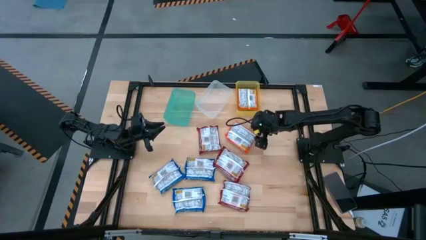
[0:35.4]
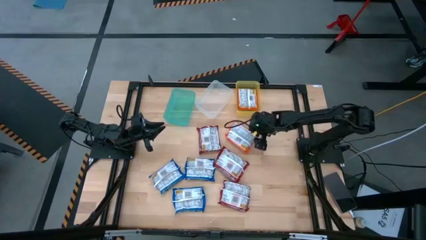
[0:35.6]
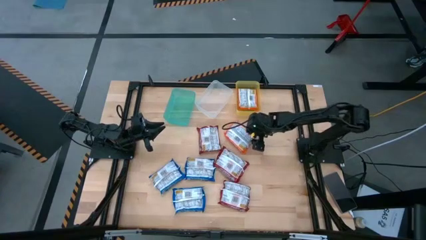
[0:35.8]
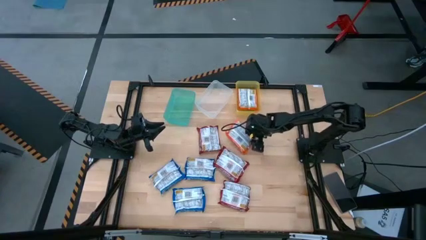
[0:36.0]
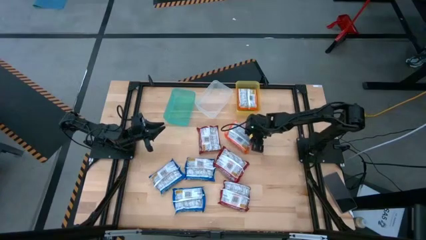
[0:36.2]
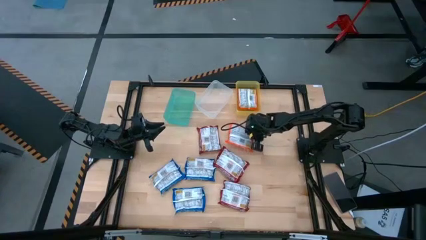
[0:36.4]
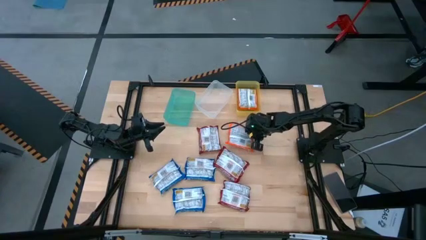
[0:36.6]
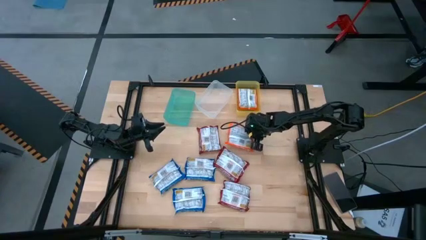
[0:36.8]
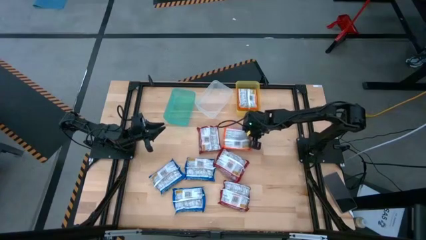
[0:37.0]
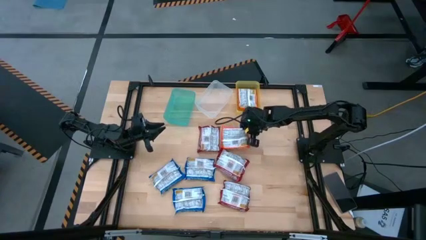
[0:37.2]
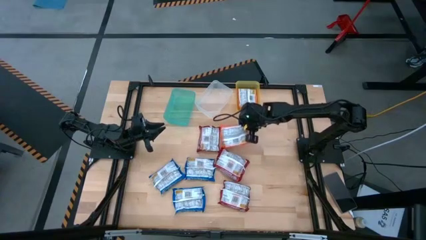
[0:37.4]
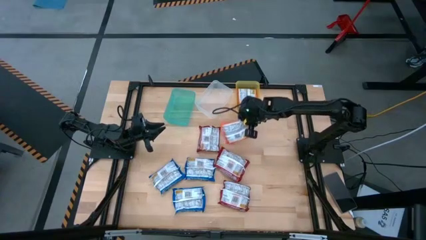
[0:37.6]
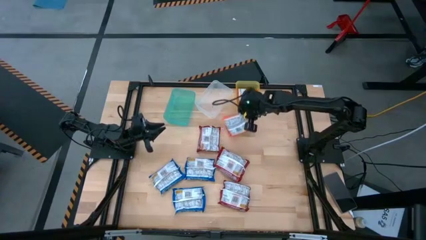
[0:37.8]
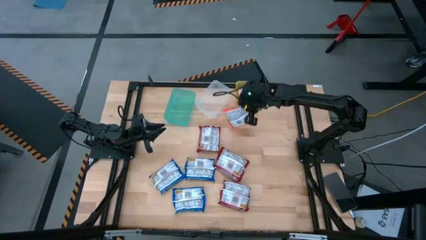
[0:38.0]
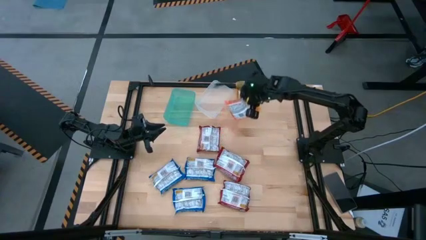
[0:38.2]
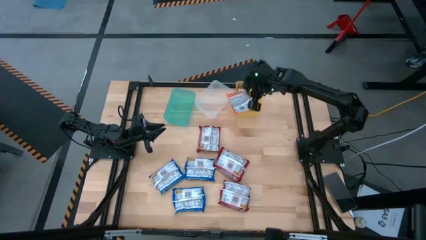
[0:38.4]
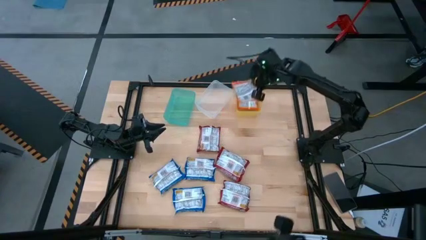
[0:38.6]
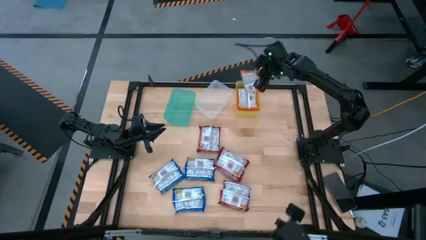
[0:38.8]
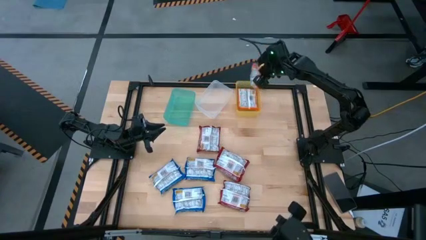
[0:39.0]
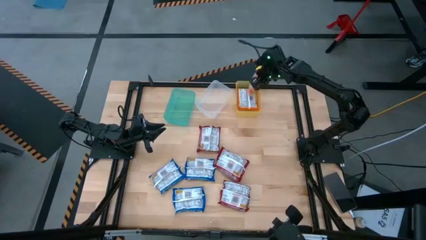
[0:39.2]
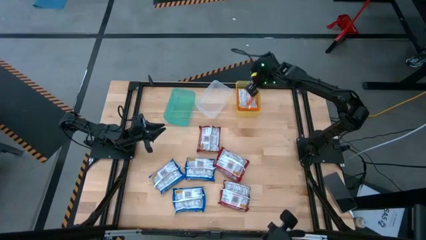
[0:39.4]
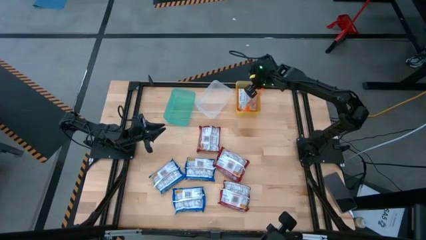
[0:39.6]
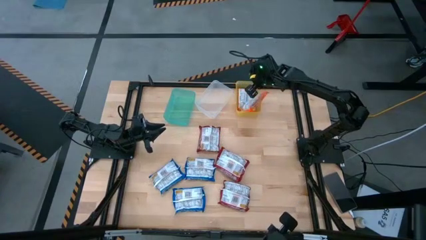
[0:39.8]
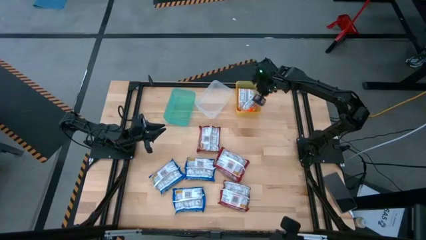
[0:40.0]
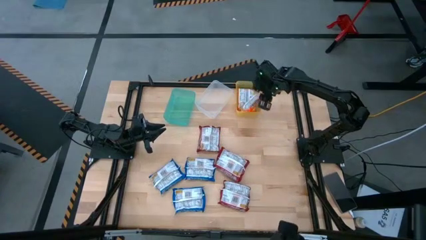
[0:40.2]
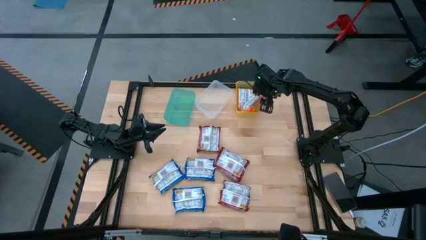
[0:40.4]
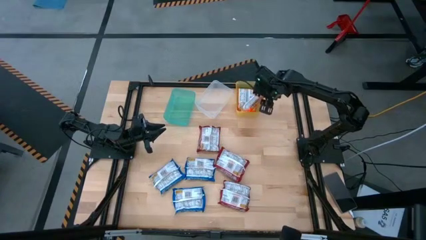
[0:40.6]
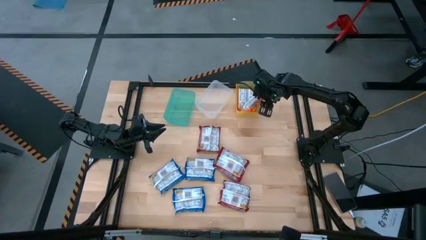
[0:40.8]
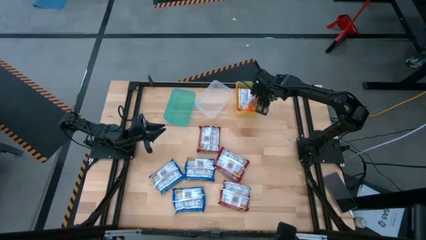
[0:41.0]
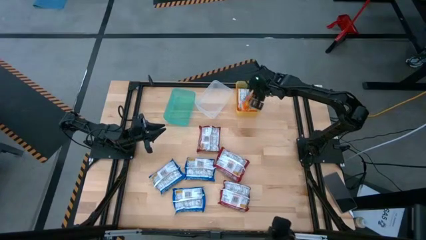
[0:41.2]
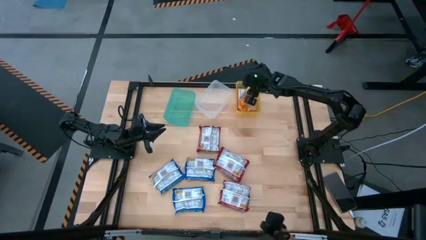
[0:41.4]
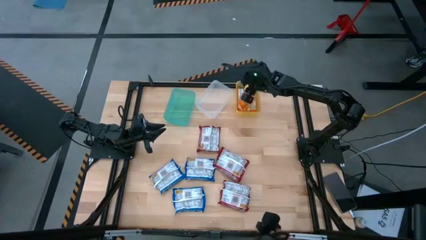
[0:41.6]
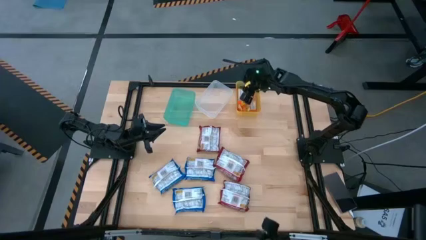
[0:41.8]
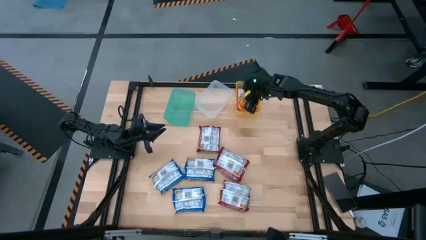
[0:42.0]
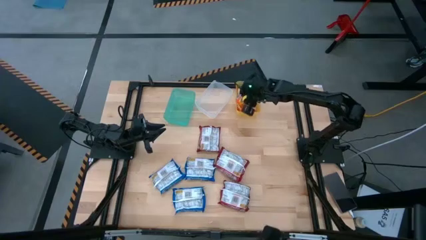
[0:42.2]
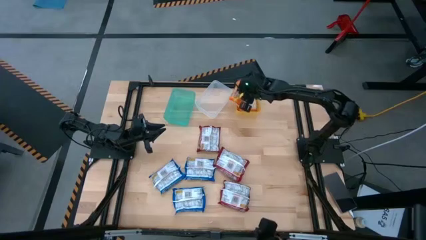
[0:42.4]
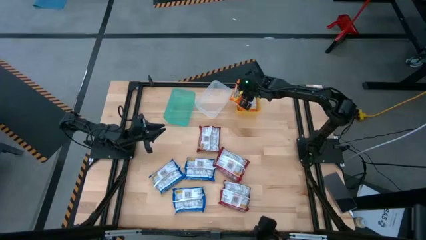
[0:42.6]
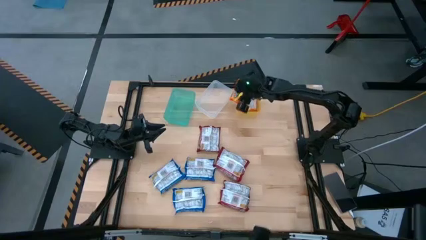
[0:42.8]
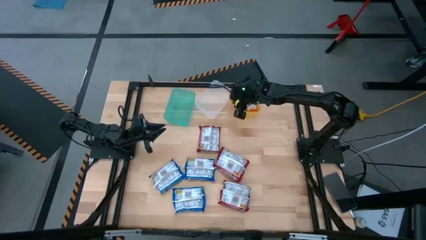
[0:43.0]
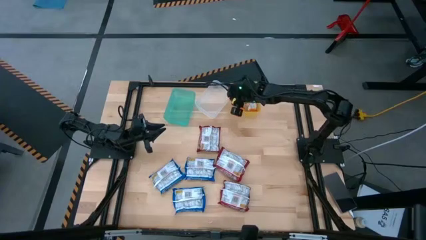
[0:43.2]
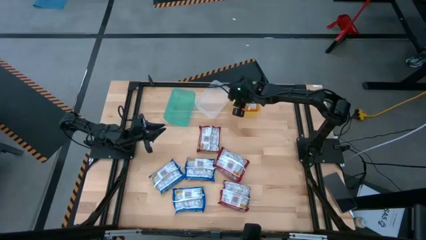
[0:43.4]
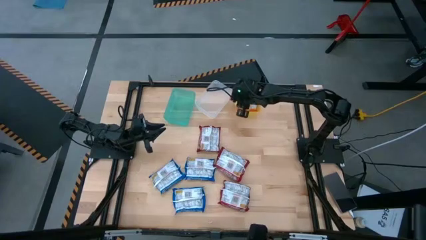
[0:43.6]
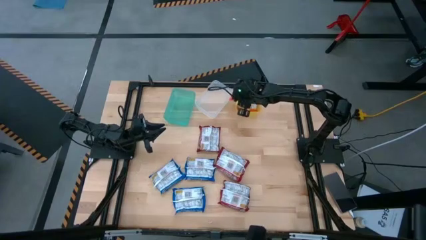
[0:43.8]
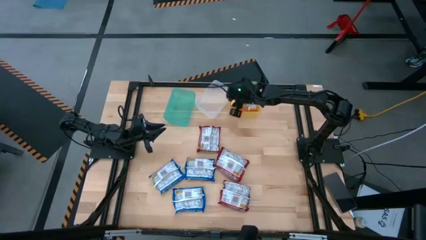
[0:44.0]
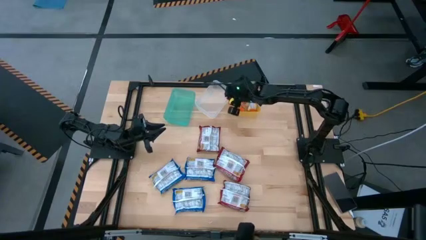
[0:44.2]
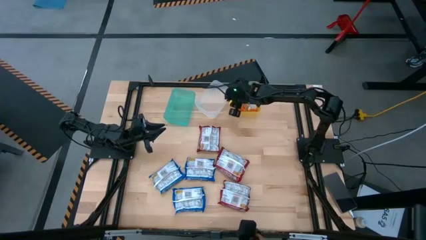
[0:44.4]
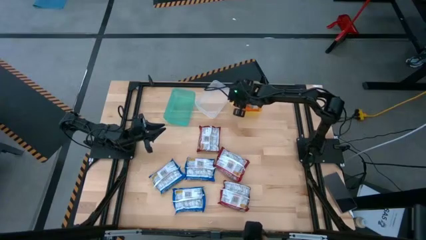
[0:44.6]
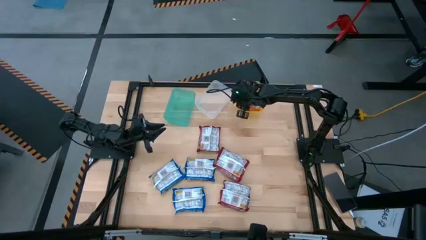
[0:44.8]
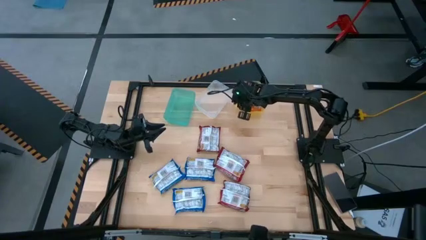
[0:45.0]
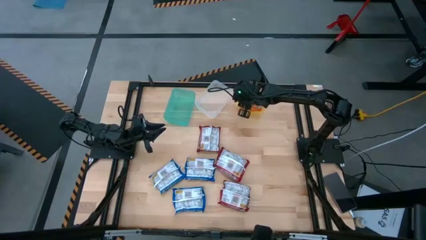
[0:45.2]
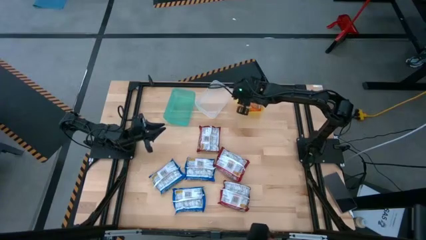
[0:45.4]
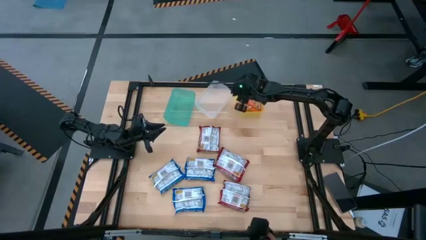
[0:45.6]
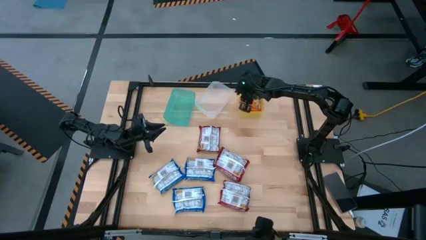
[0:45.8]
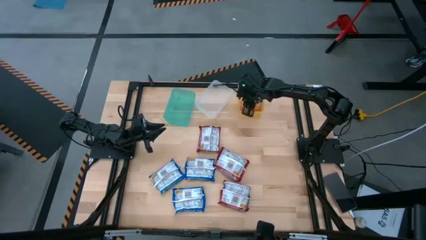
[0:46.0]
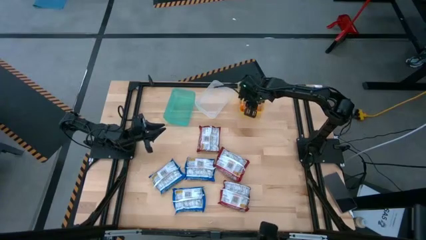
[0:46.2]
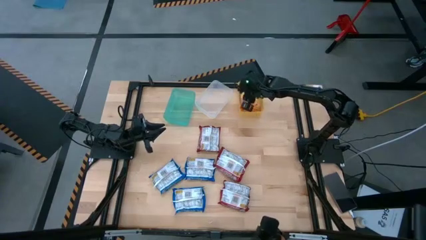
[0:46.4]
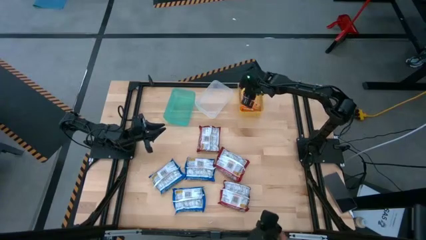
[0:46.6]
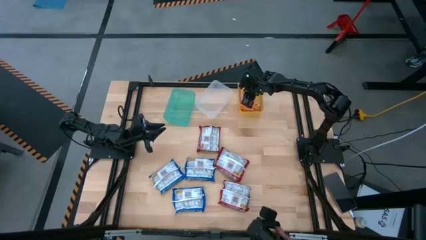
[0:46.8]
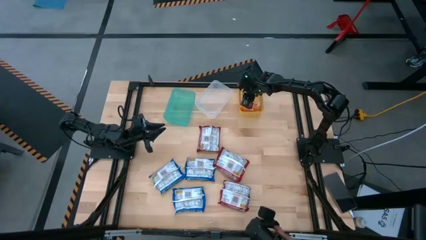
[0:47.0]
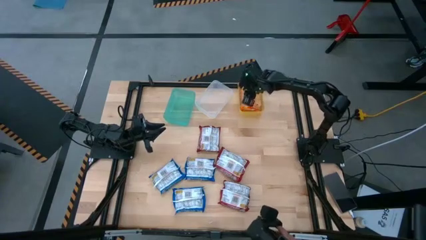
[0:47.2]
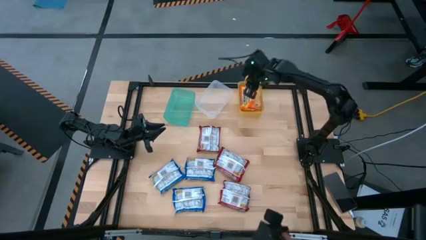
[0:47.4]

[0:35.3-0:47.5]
Task: Sort Maruchan noodles
Put the orange noodle pack into the yellow bin

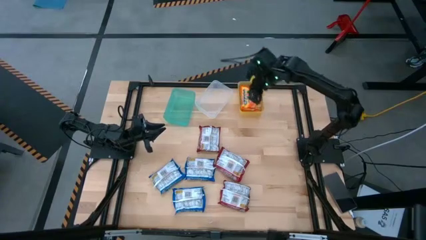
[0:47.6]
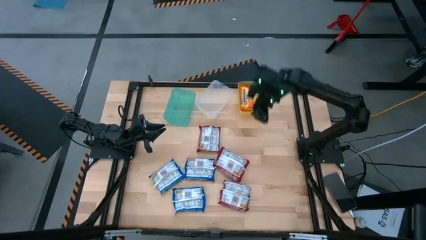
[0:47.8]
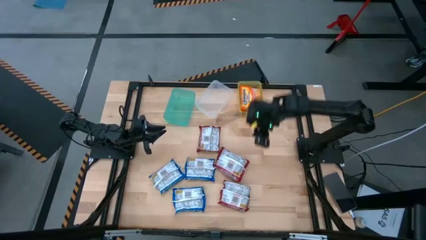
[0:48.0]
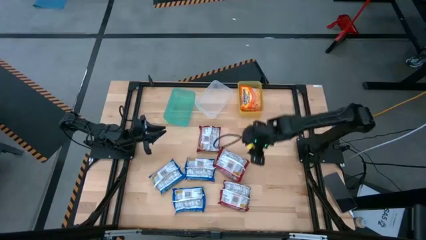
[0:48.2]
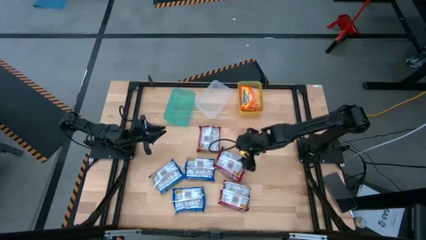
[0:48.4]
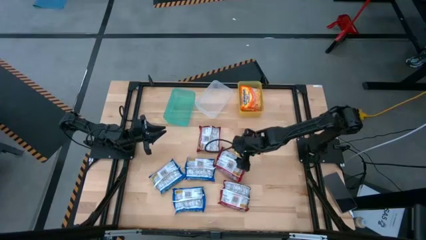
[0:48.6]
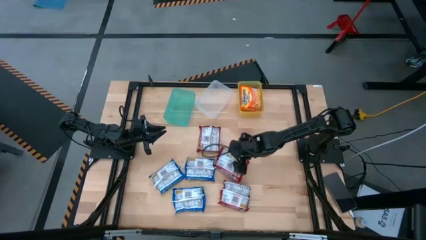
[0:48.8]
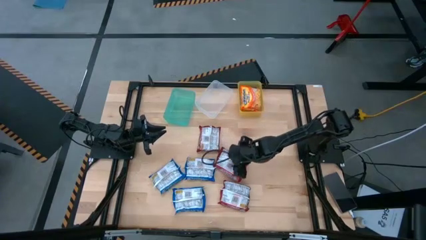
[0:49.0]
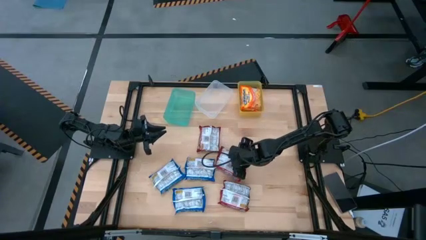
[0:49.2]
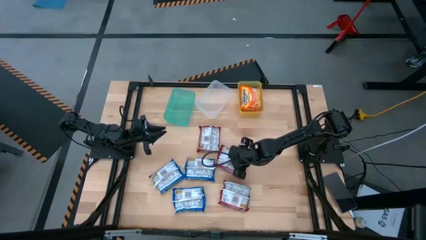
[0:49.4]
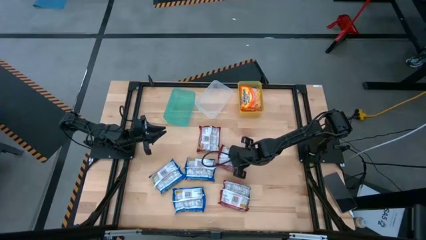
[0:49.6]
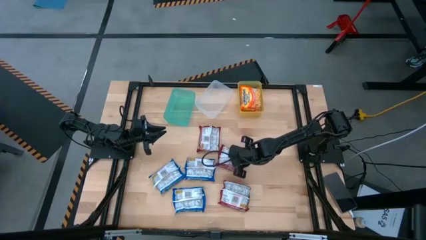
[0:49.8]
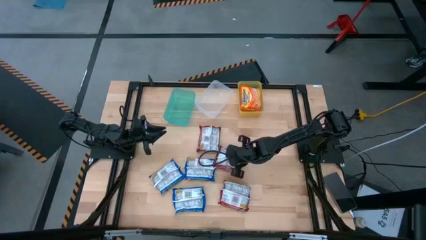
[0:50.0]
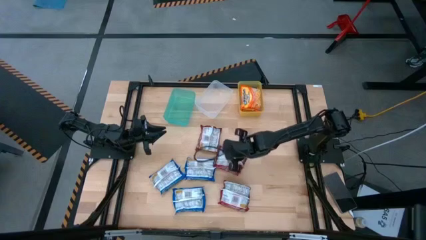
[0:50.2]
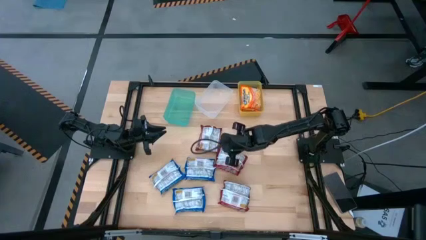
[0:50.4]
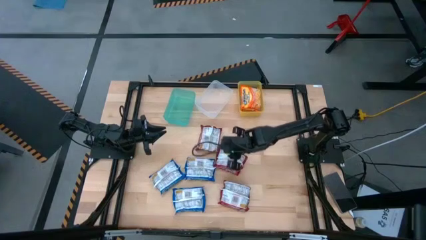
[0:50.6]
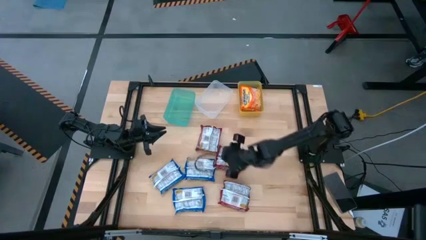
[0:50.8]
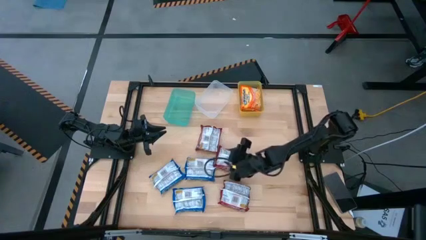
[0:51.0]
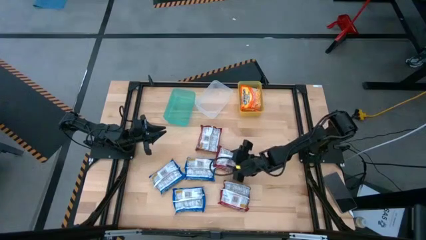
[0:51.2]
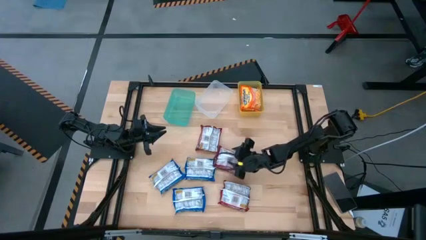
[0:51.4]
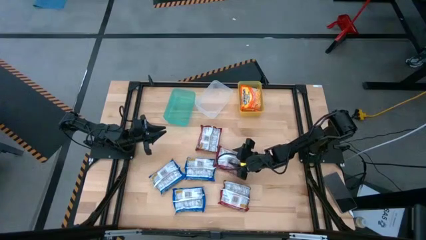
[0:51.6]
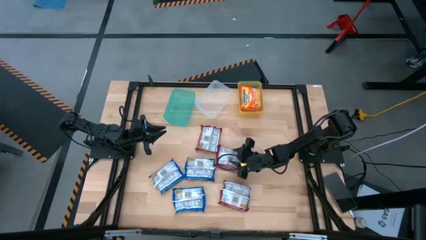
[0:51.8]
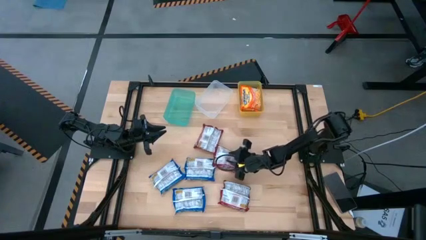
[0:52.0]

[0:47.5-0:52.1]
Put the middle red noodle pack into the transparent bin
